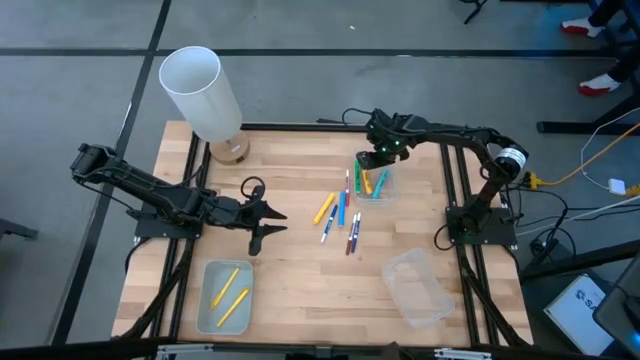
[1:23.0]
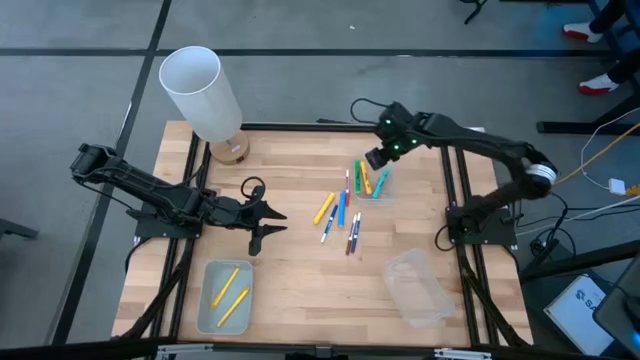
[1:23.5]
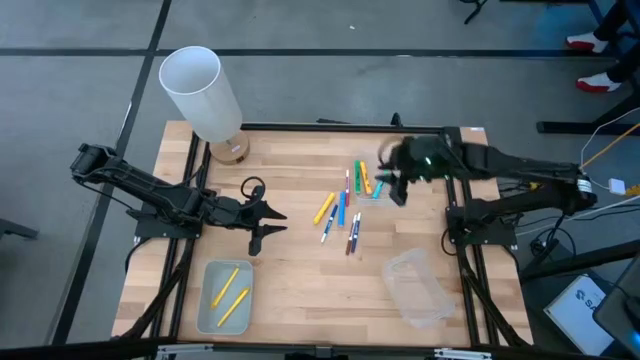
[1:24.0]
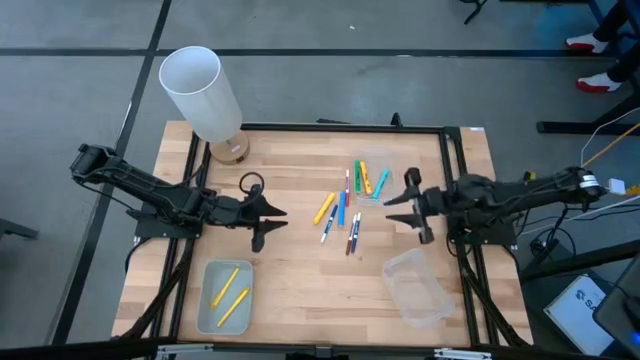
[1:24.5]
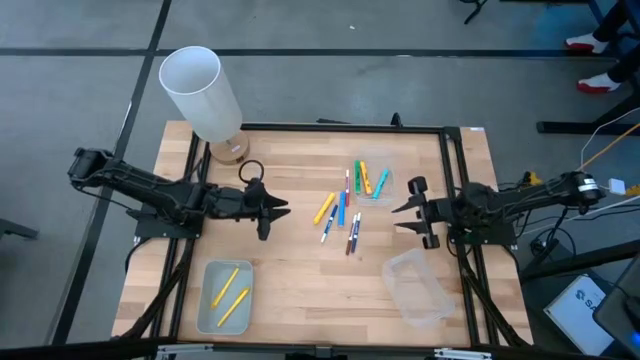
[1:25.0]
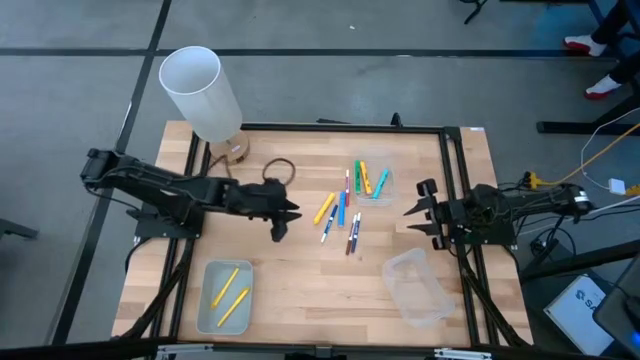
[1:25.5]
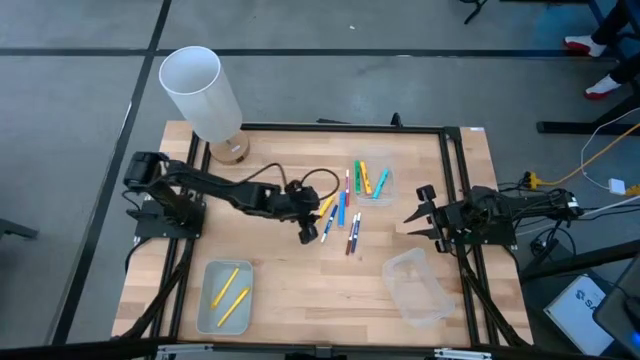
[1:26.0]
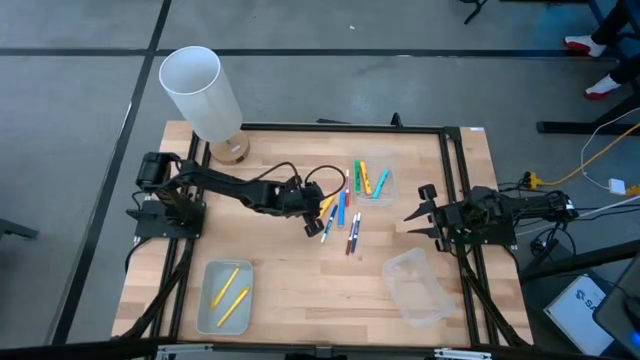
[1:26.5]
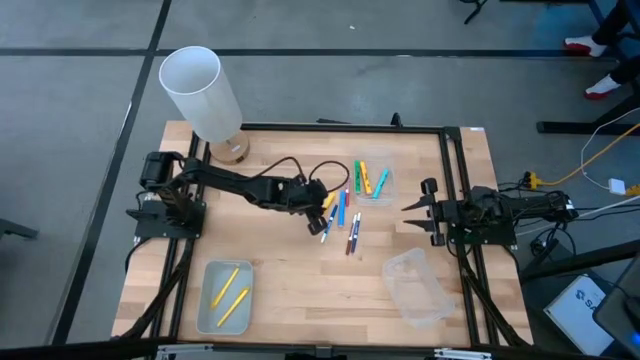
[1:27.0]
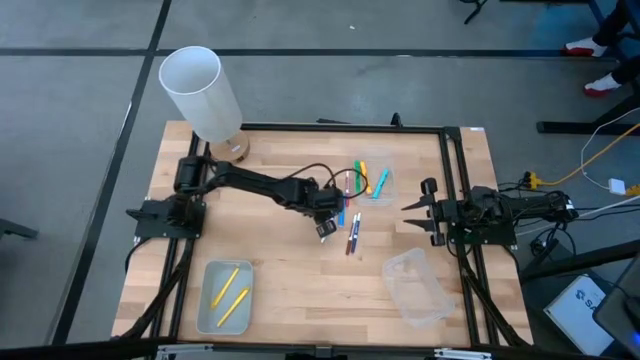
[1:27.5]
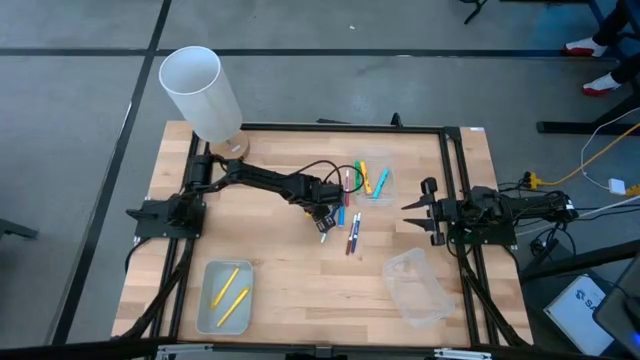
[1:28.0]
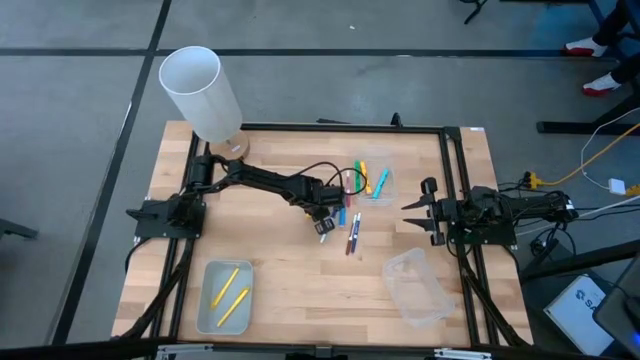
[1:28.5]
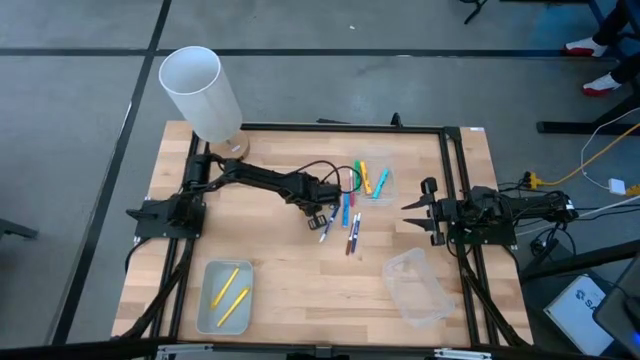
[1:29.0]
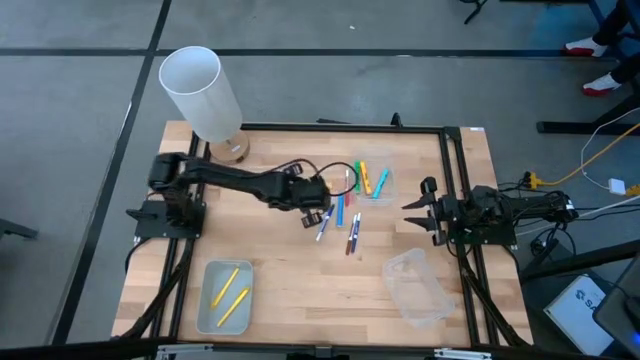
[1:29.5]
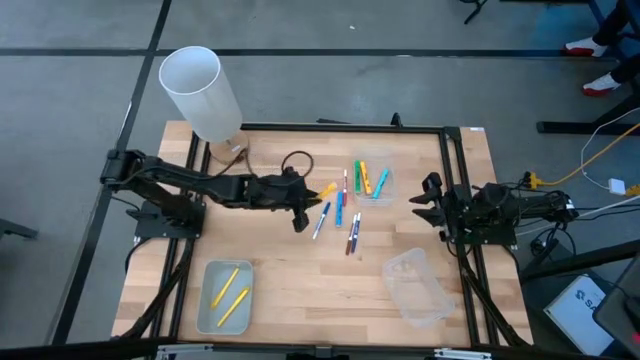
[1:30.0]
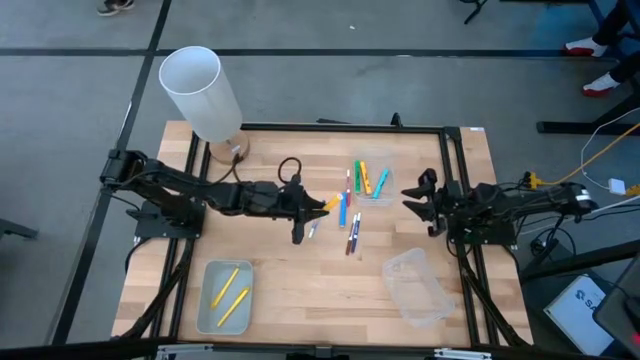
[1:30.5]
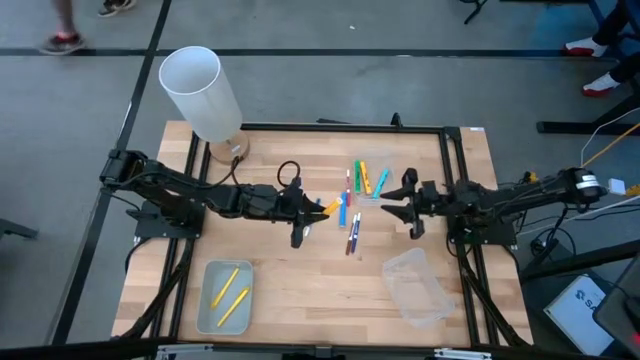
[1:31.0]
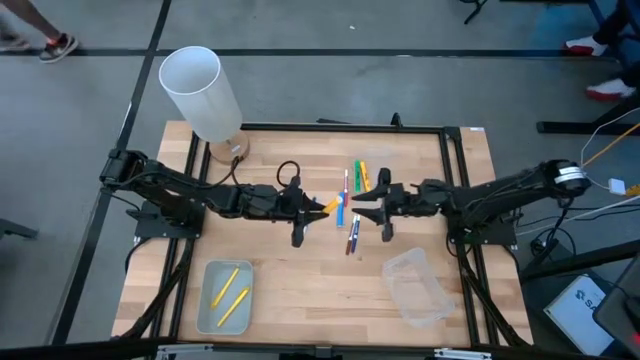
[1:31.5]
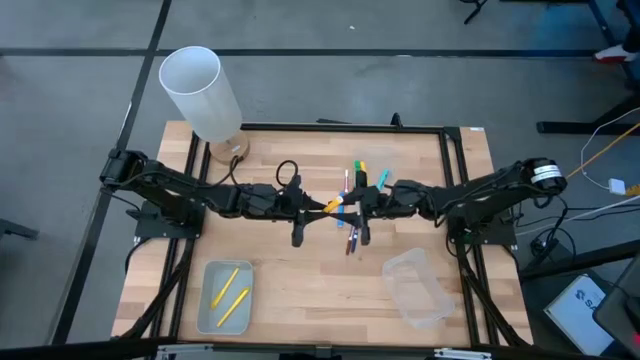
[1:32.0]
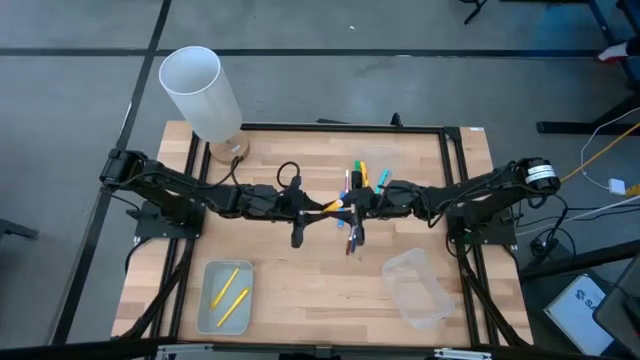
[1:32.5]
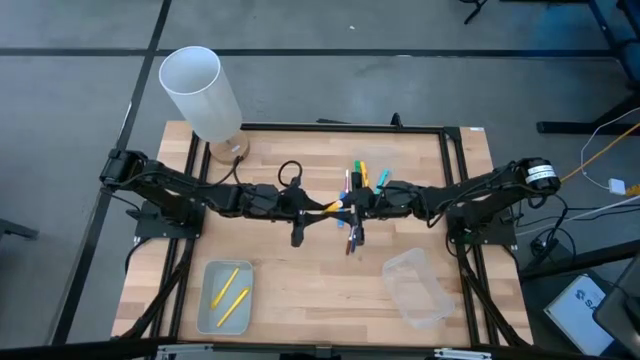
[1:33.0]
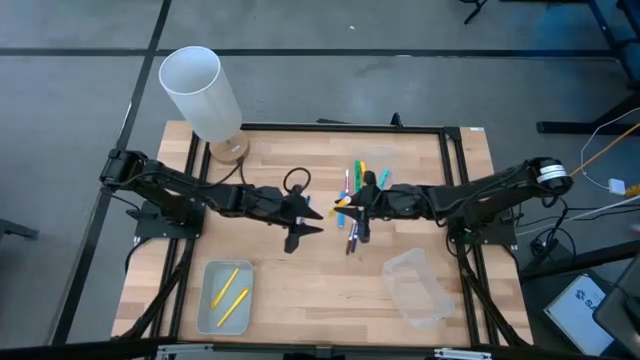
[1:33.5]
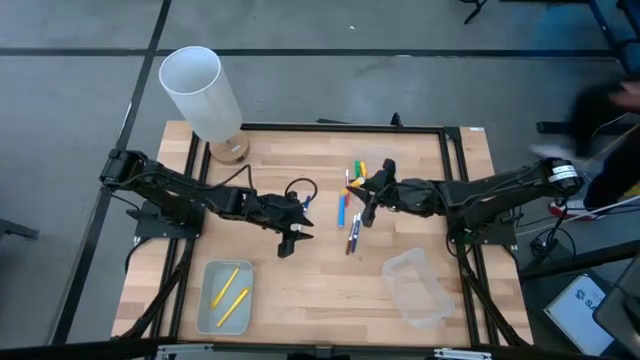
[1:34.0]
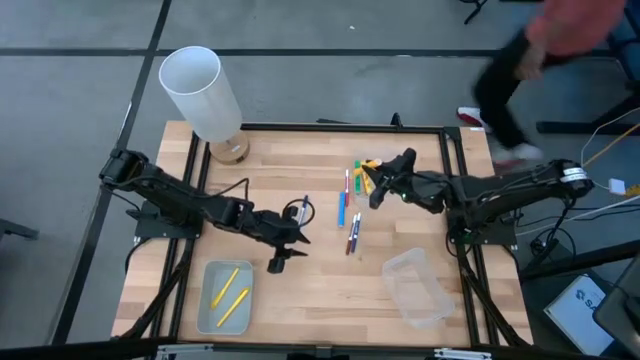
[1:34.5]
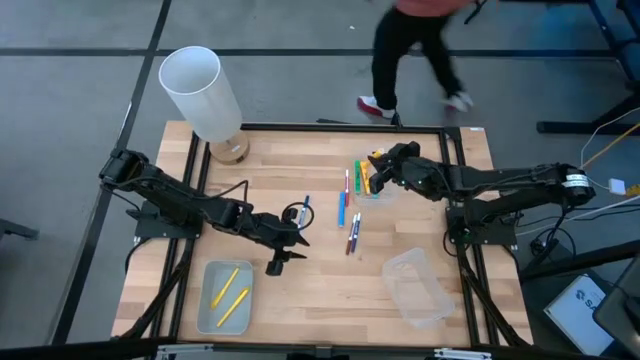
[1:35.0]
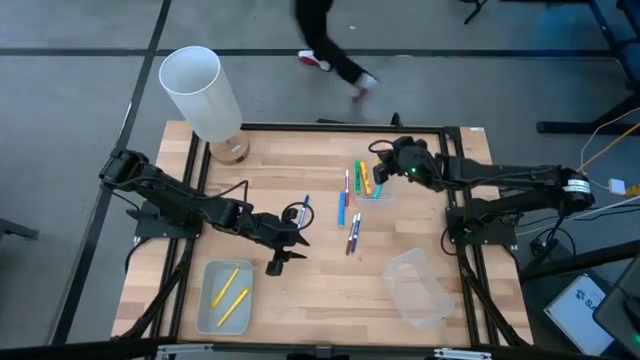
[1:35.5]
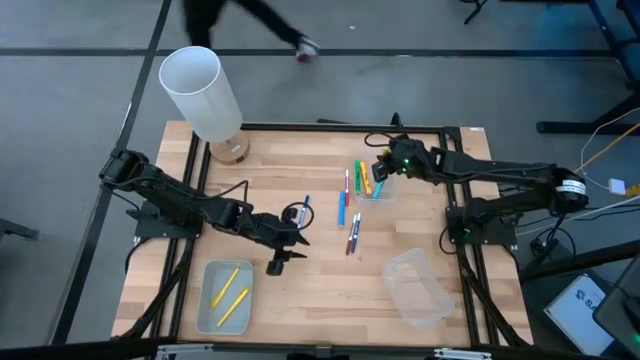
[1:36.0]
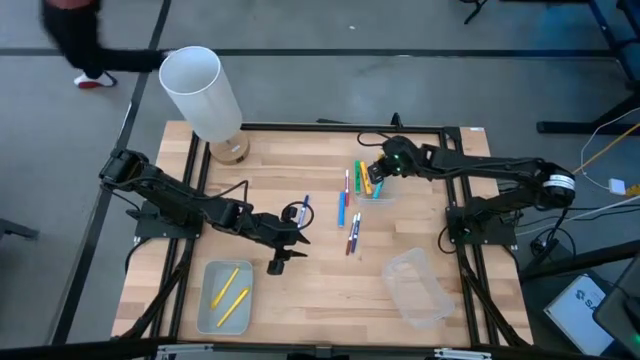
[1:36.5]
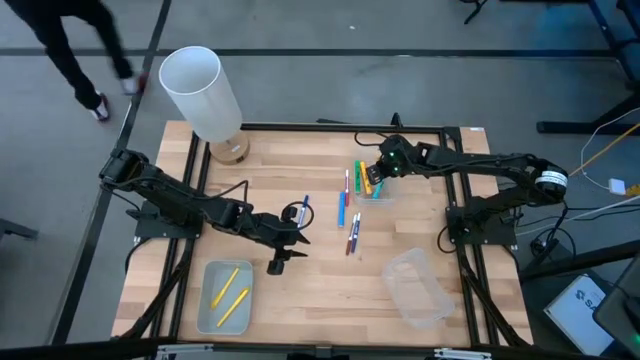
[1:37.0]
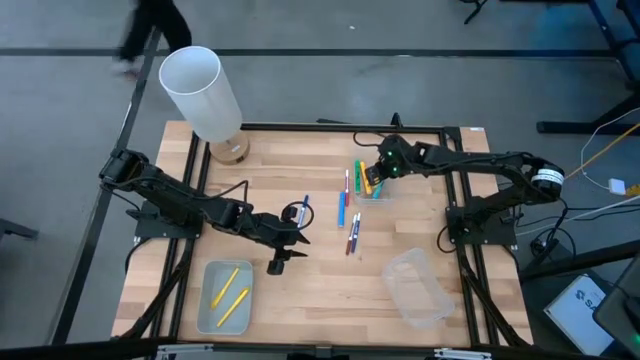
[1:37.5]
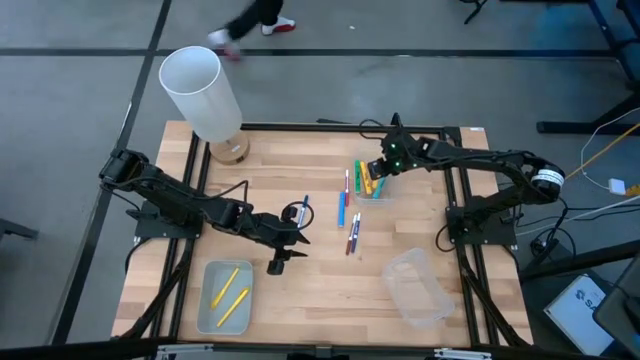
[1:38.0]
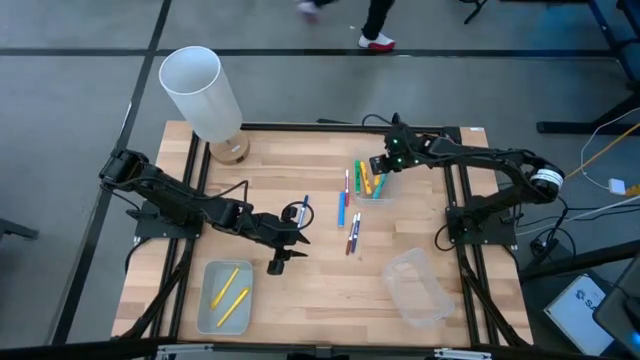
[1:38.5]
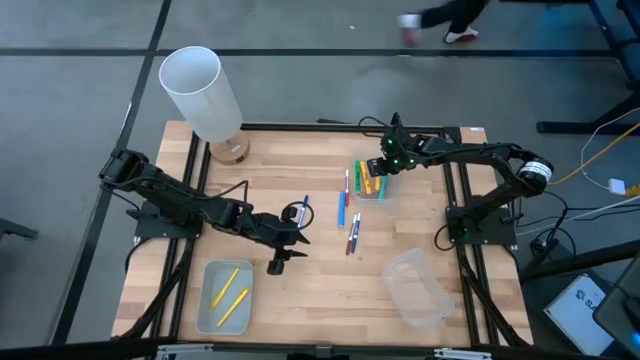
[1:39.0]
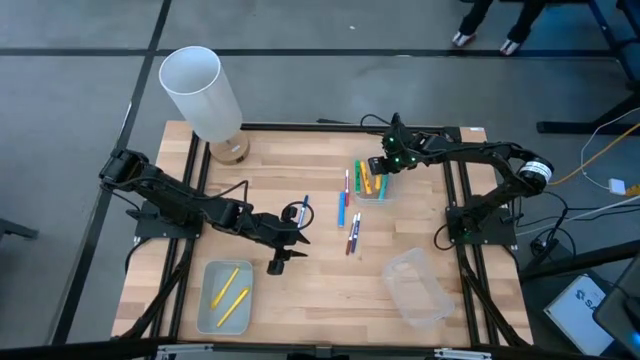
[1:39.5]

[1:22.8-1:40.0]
Task: Pick & Place Markers
Put the yellow highlighter pen into the top transparent bin

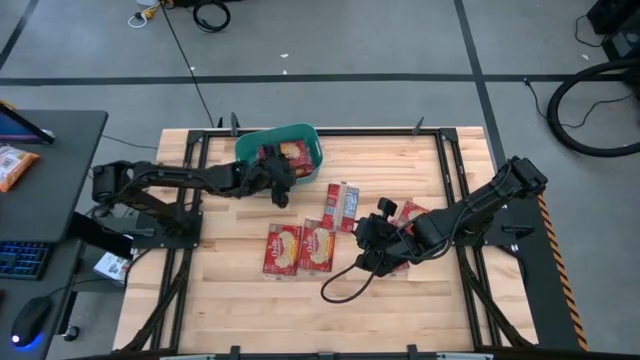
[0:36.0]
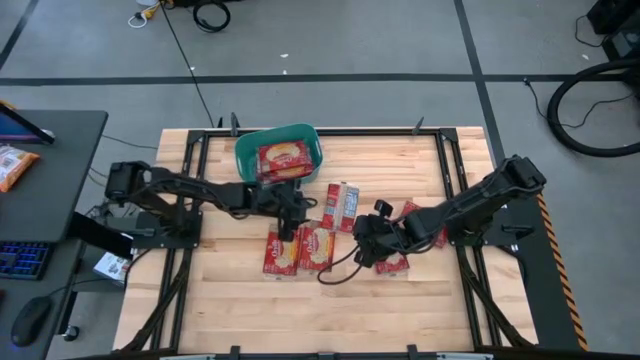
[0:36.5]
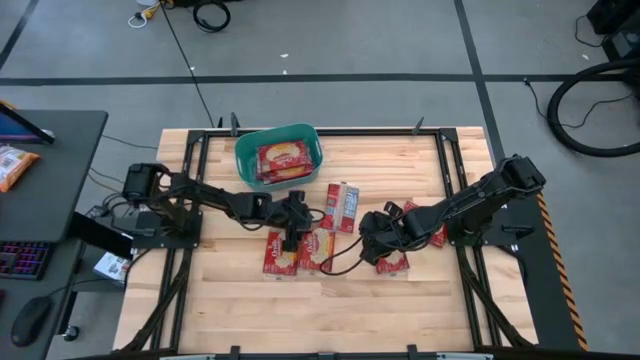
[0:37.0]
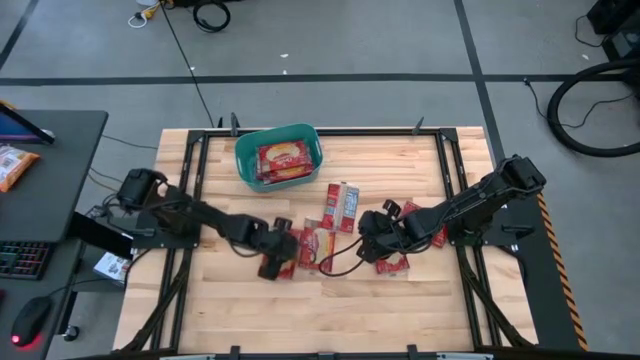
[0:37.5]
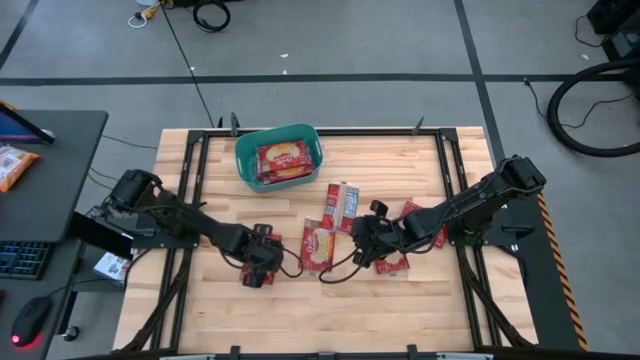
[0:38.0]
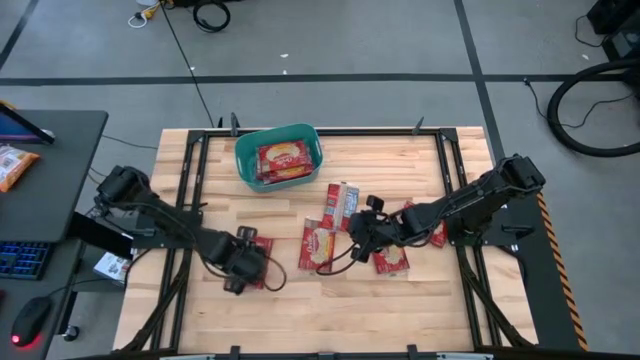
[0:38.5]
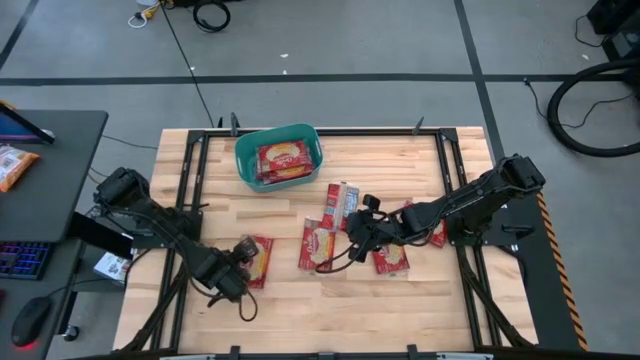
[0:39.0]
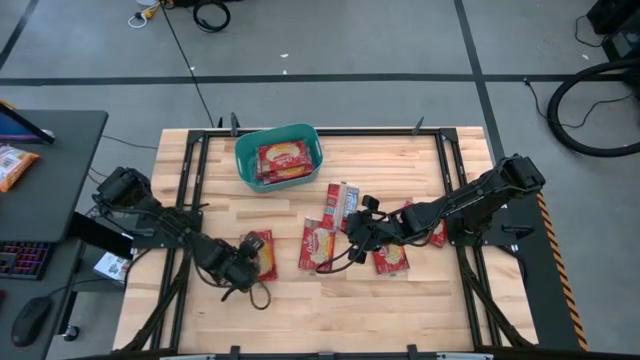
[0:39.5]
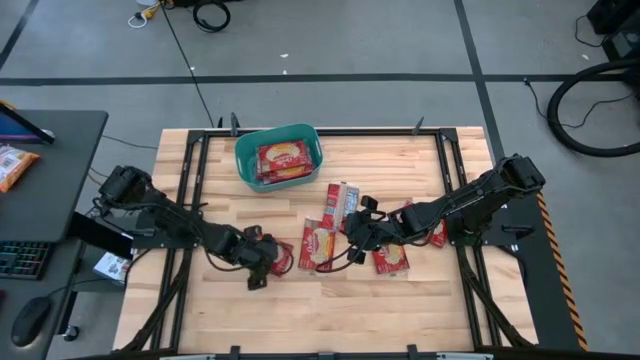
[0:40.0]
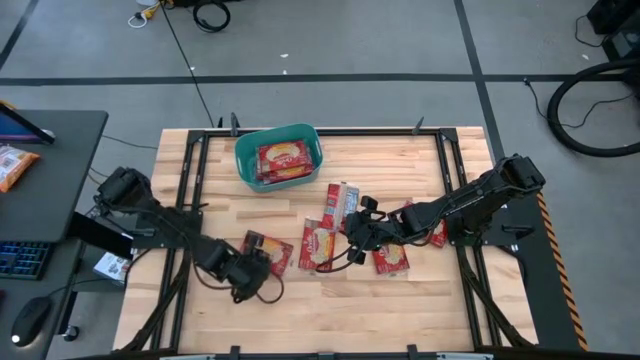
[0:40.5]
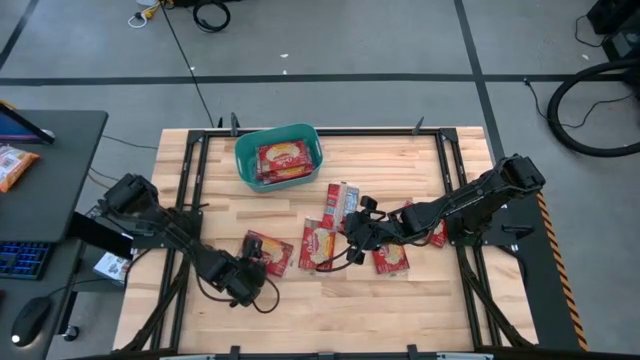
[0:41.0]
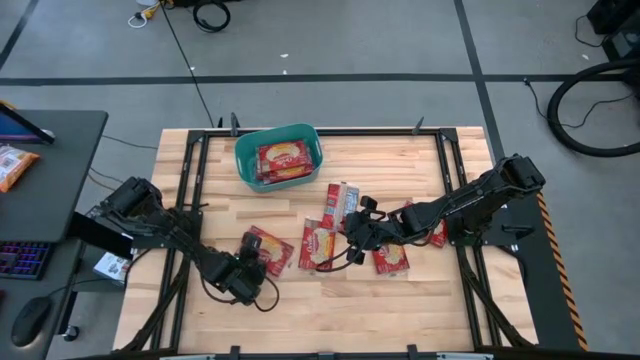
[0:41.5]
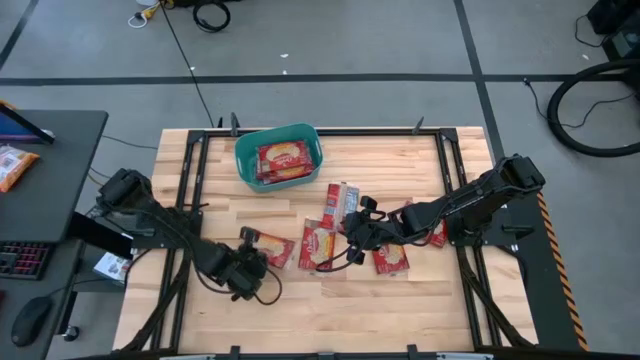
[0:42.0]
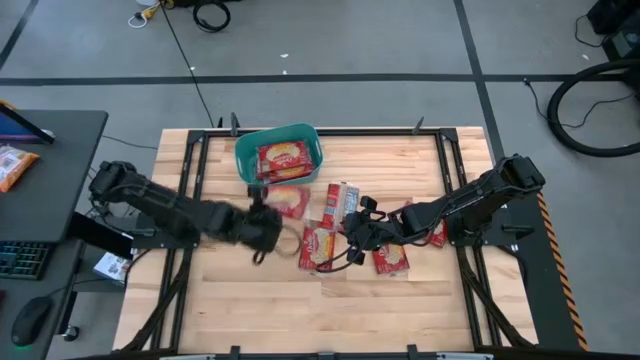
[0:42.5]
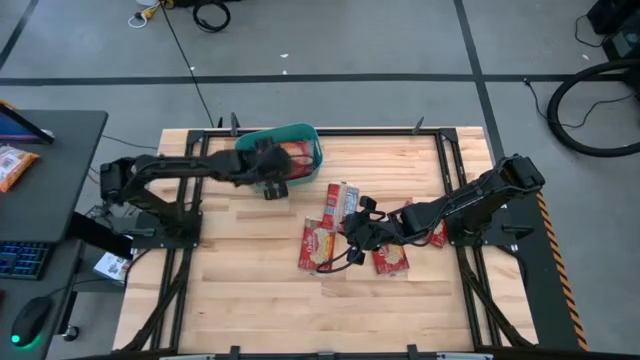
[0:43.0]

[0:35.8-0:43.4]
Task: Sort popcorn bags into baskets
Put the red popcorn bag into the green bin
